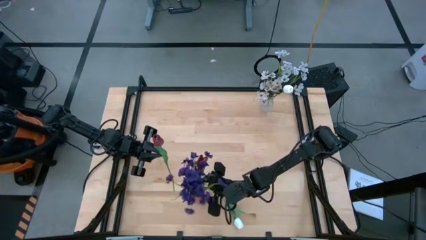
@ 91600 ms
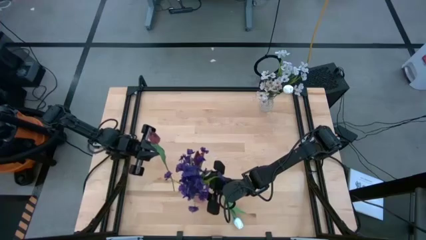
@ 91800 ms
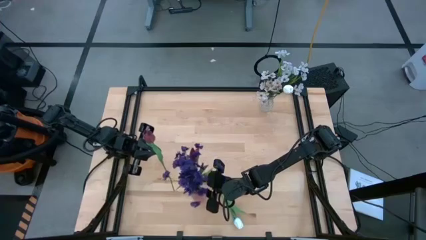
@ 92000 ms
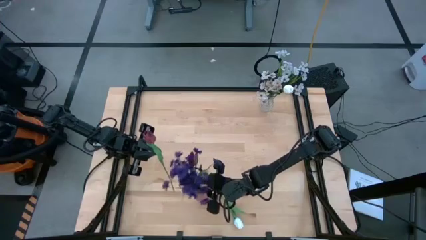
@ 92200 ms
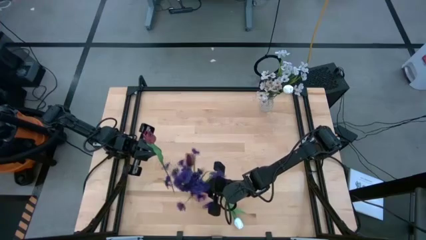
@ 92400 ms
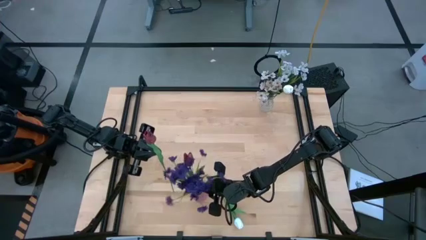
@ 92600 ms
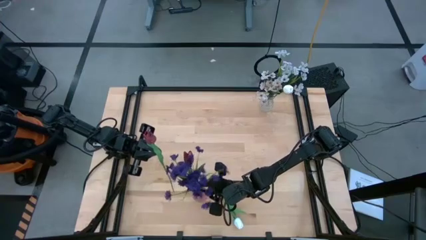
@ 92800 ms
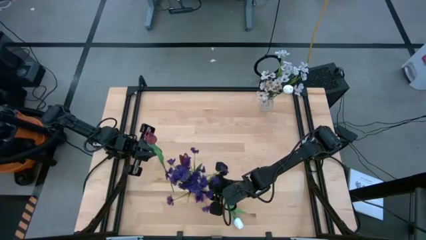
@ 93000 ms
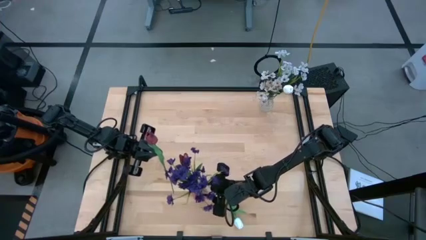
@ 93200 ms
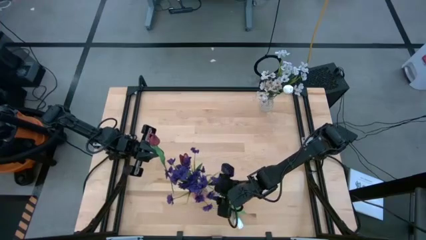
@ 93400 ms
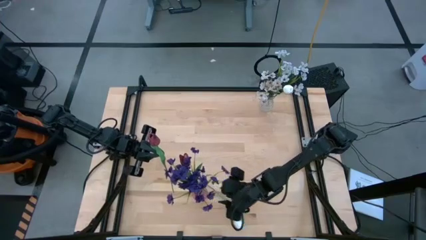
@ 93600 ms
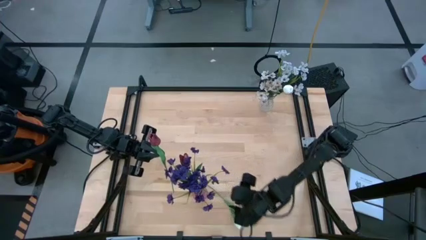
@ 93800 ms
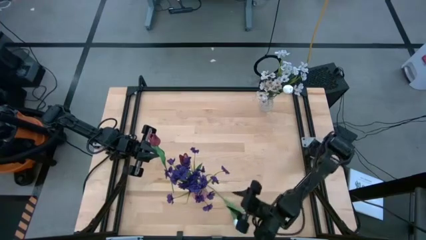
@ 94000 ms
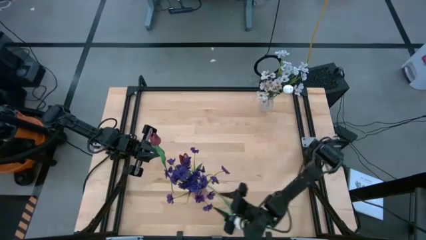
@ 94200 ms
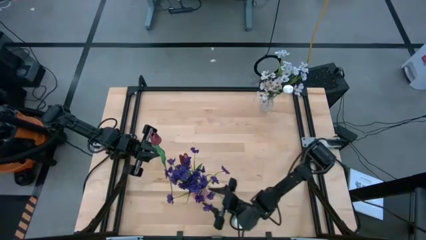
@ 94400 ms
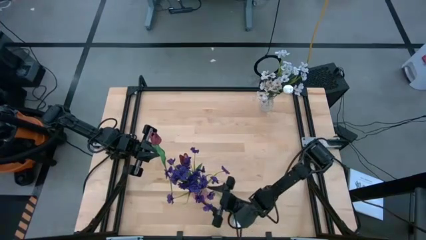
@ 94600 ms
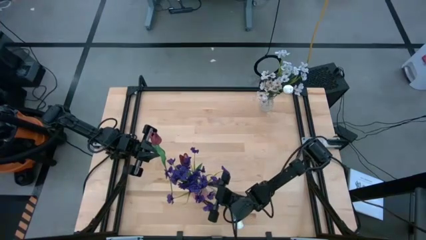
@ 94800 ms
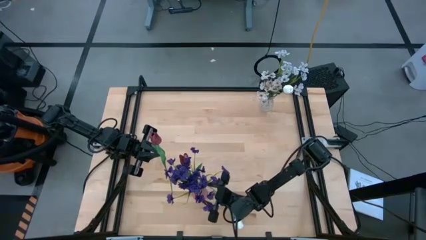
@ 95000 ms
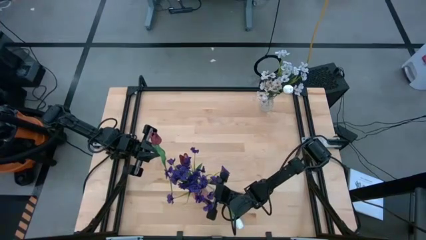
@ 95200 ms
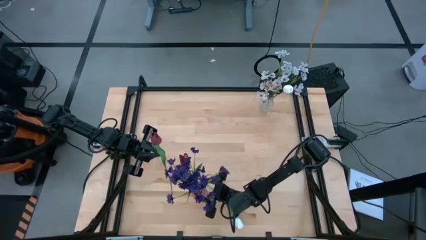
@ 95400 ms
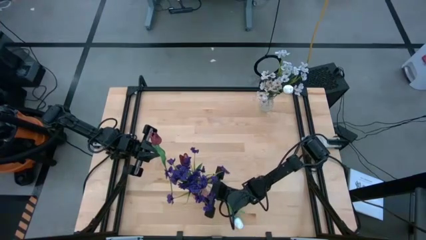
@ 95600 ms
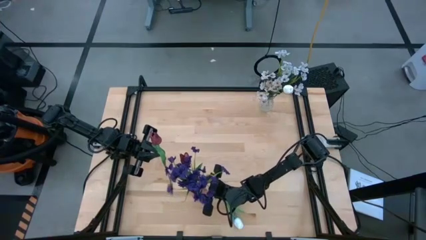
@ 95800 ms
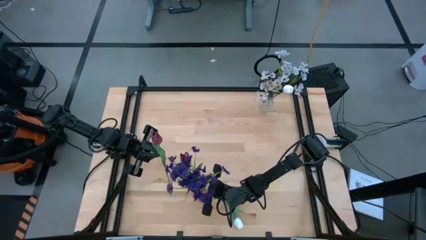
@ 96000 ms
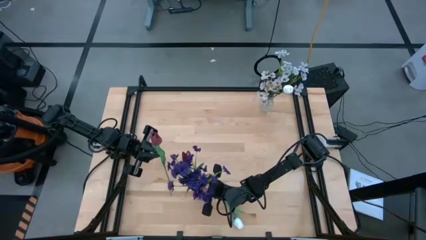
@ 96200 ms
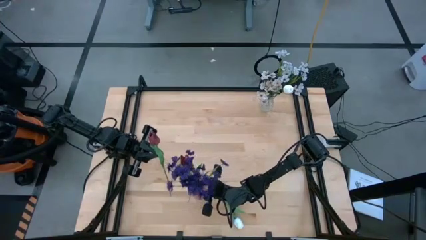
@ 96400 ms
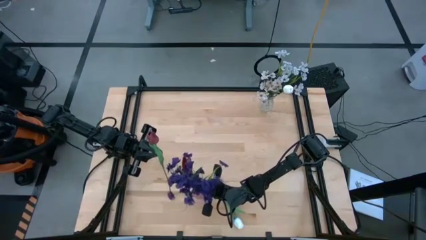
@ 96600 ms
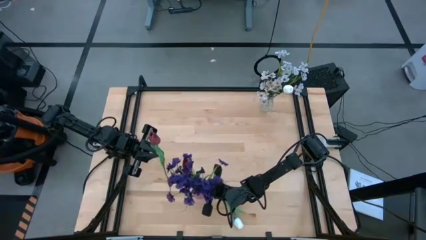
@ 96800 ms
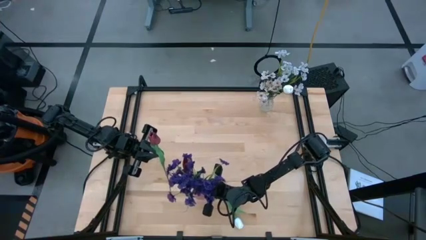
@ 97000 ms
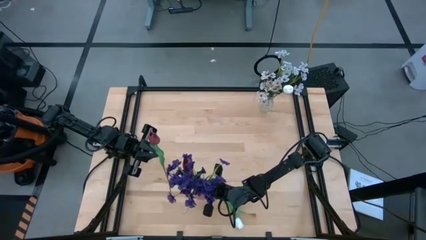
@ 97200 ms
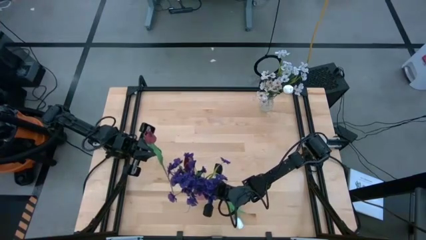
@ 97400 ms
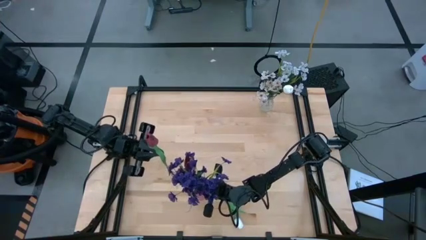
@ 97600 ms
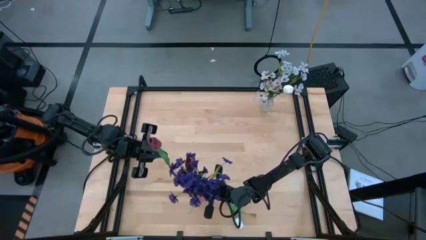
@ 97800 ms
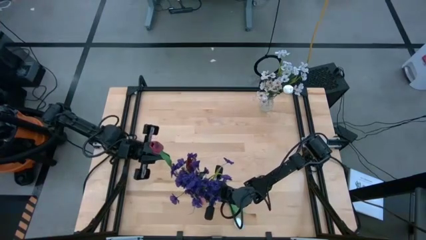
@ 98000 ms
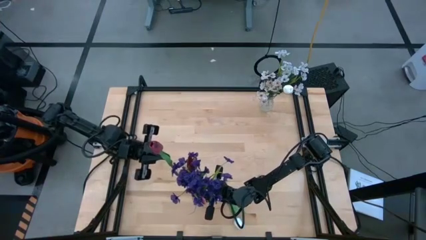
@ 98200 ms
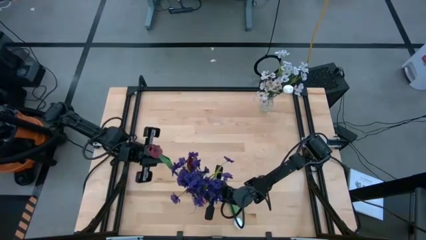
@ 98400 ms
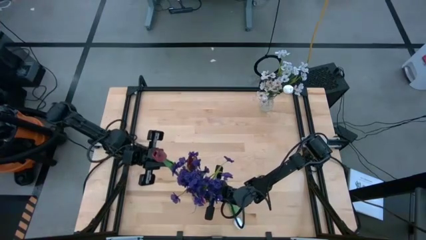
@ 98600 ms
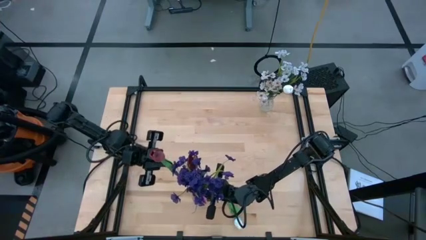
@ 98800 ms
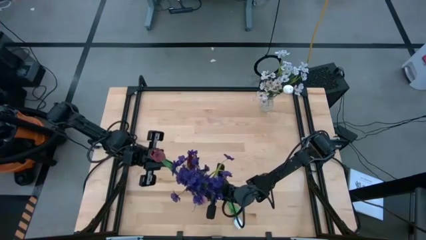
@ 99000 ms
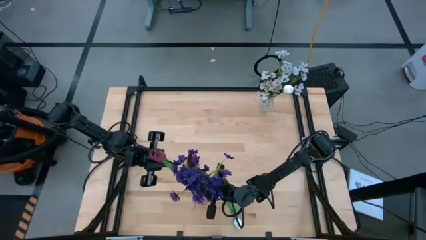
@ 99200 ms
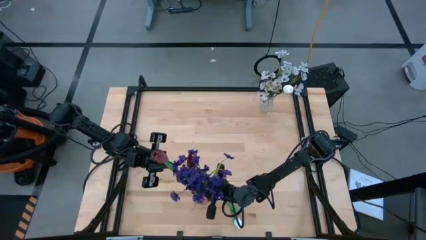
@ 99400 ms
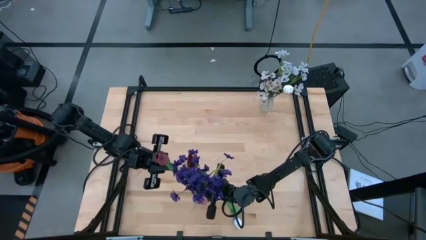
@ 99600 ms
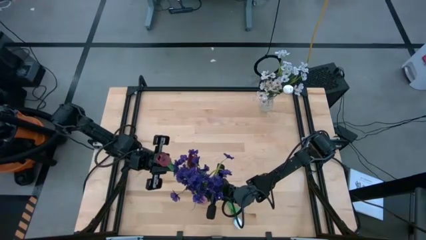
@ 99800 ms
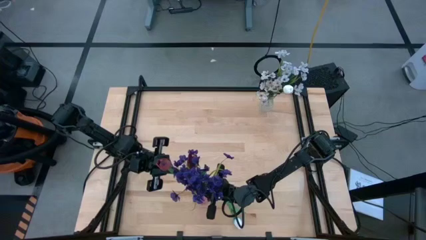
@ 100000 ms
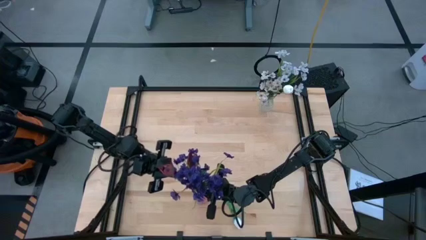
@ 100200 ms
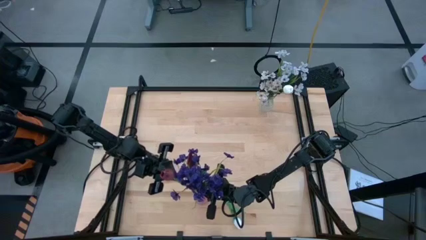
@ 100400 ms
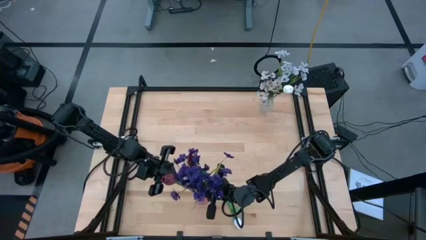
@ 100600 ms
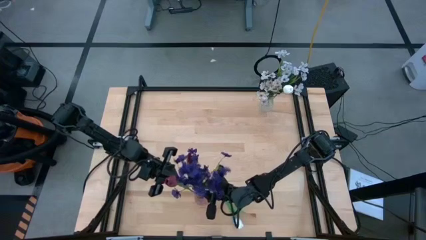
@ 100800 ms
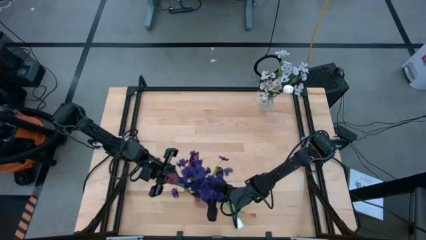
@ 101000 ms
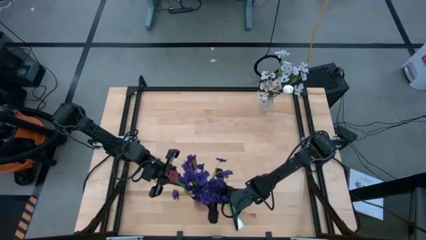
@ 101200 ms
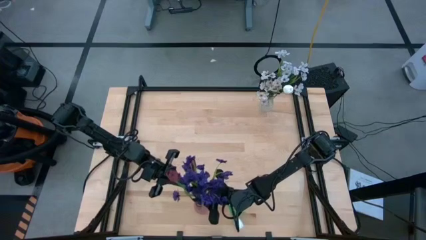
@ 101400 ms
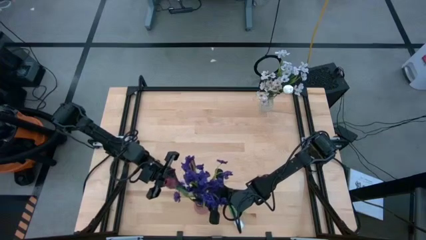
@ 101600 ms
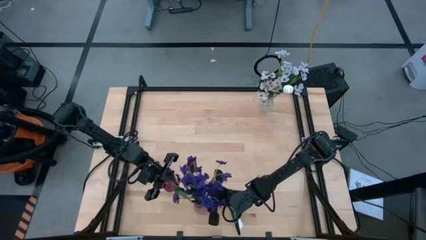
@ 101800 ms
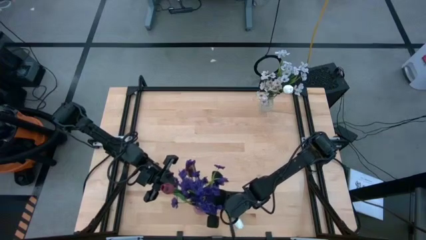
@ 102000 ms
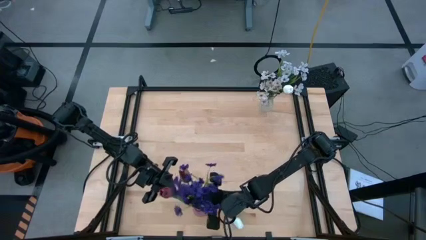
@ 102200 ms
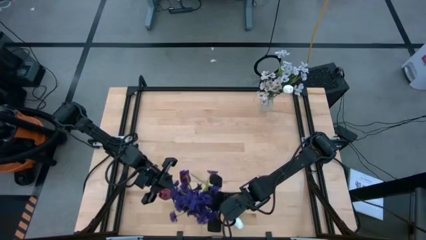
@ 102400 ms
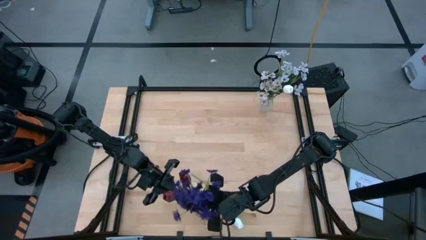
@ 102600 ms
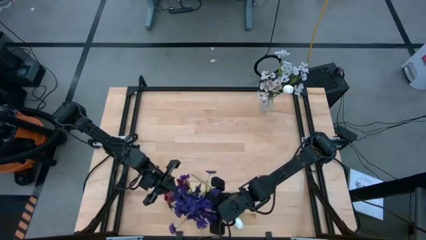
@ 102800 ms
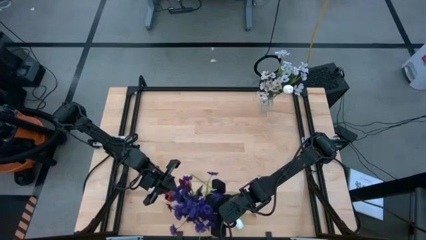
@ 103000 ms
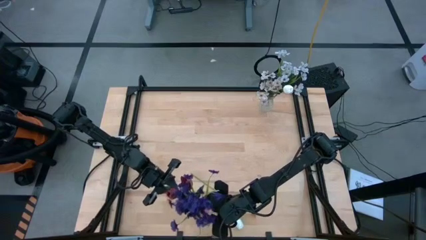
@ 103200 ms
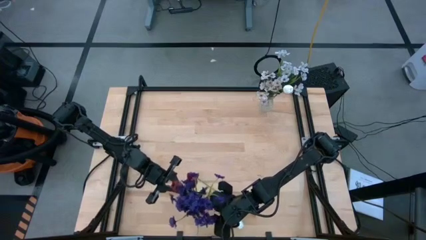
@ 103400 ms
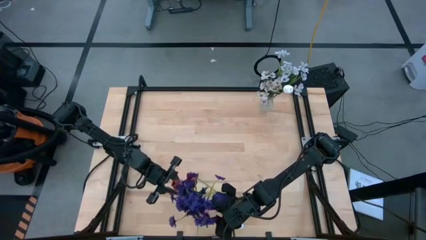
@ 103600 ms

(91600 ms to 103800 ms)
Task: Sort flowers into vase by color
Put the red flower into the pink vase

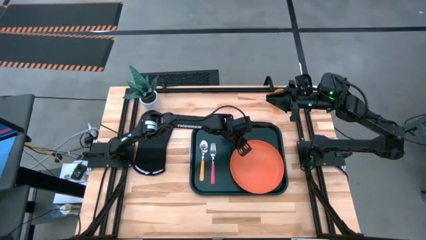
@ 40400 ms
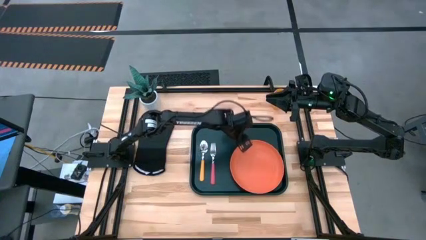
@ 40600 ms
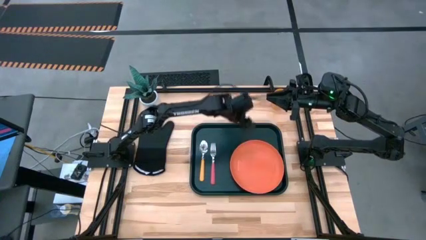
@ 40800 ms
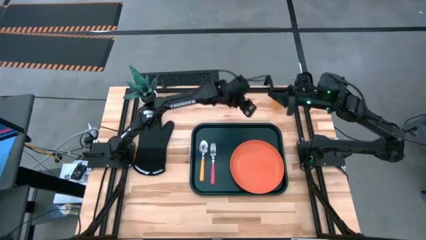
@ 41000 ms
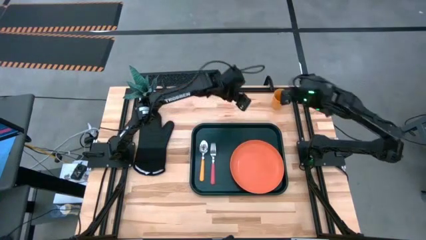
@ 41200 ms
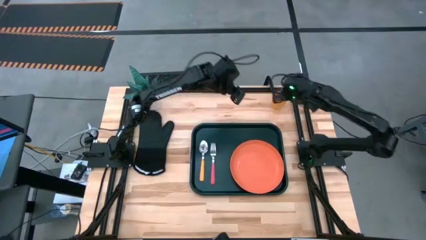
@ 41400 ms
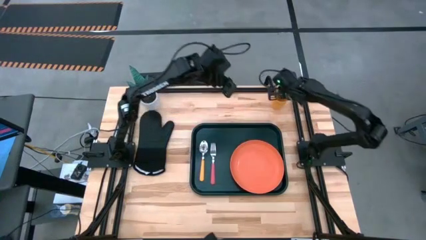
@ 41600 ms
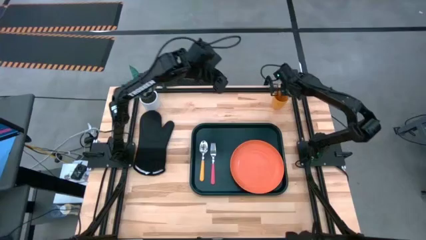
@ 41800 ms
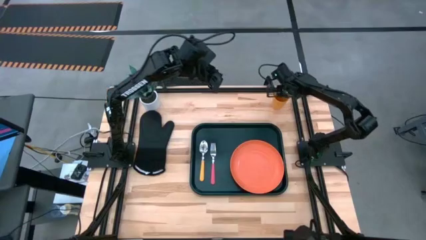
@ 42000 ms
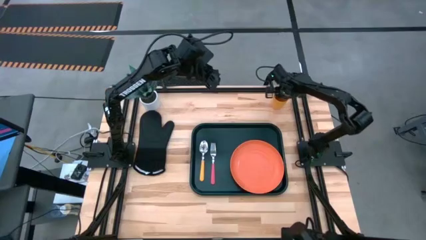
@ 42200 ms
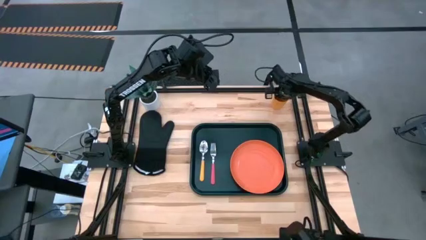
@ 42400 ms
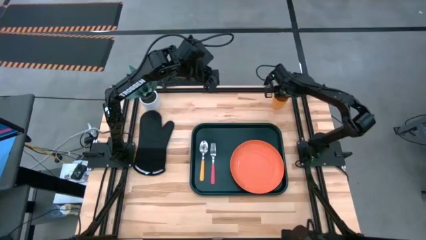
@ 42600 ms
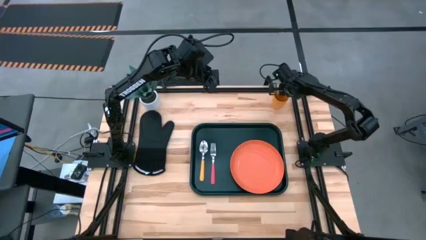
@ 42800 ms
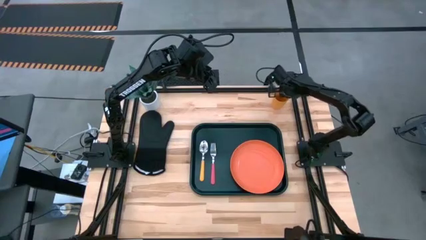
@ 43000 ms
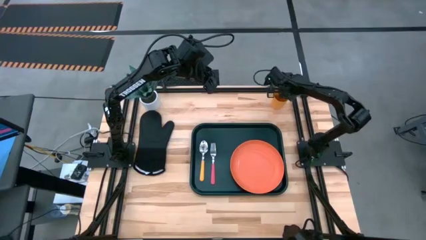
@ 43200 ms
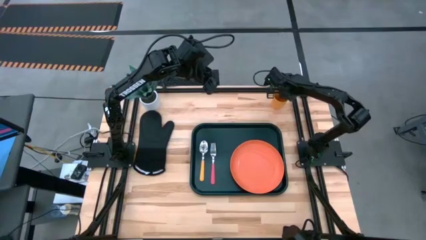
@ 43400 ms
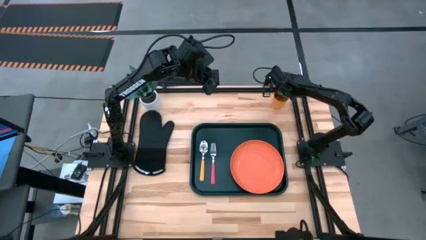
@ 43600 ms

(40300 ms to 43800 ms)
Task: Pick and place plate/cup/fork/spoon on tray
Put the yellow cup at the top of the plate on the black tray
